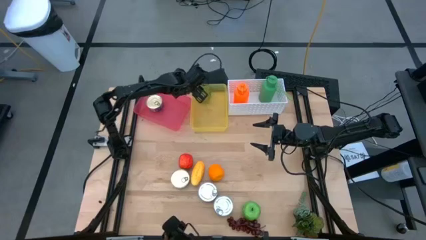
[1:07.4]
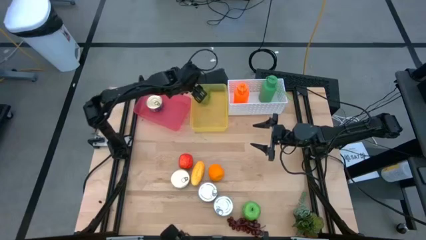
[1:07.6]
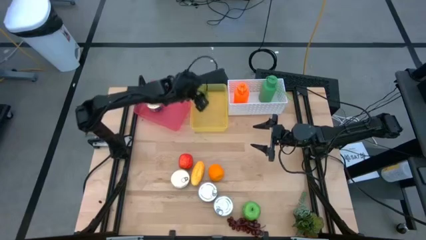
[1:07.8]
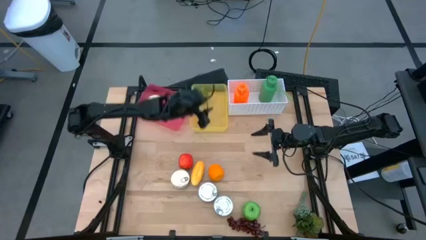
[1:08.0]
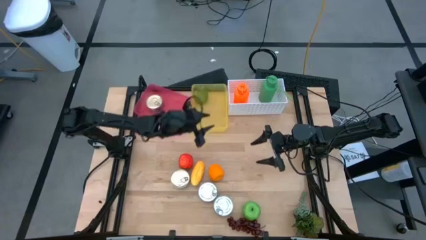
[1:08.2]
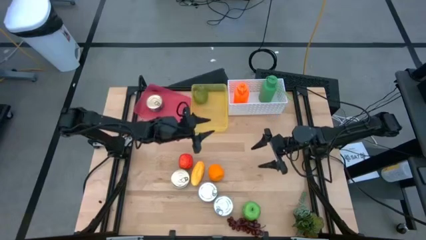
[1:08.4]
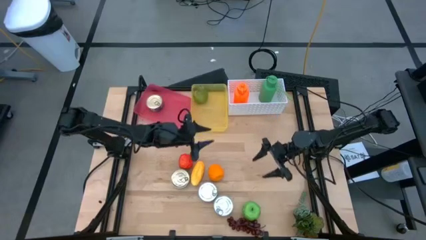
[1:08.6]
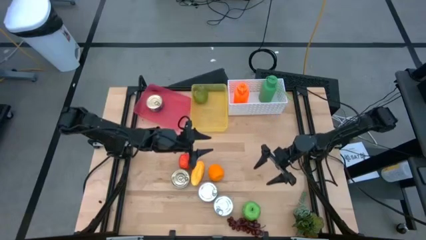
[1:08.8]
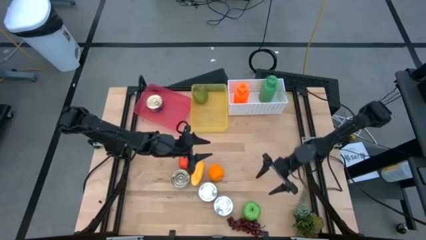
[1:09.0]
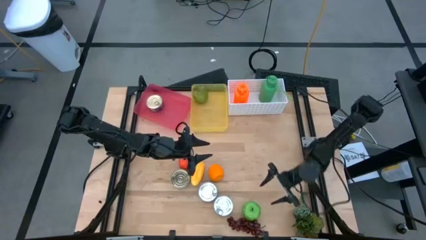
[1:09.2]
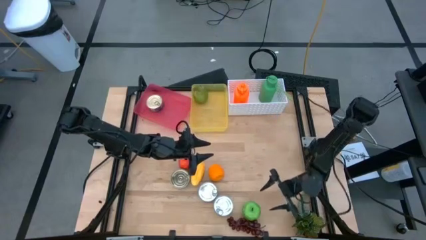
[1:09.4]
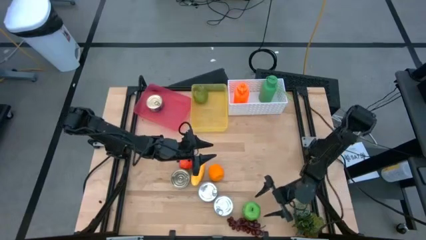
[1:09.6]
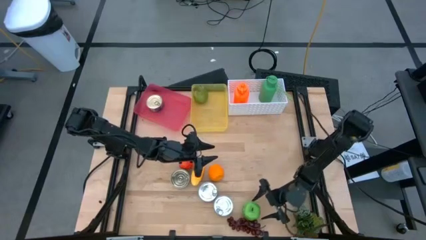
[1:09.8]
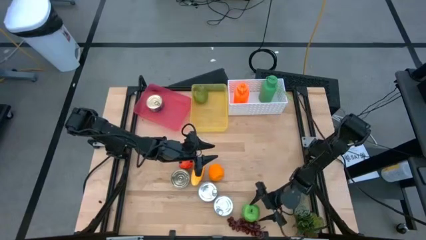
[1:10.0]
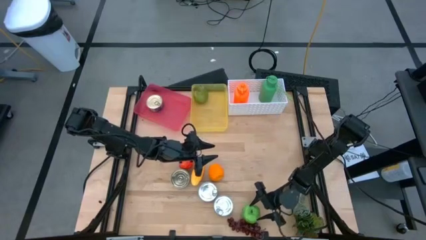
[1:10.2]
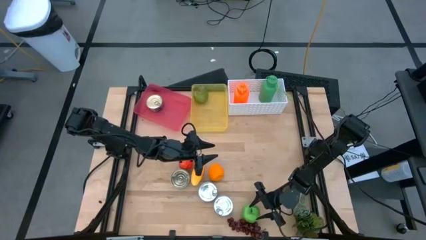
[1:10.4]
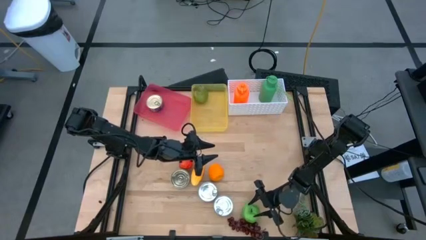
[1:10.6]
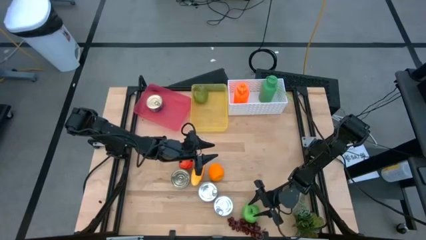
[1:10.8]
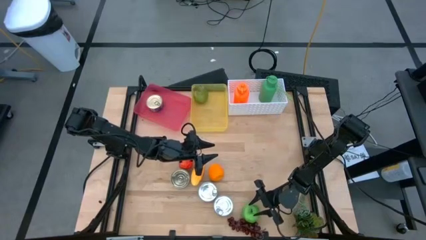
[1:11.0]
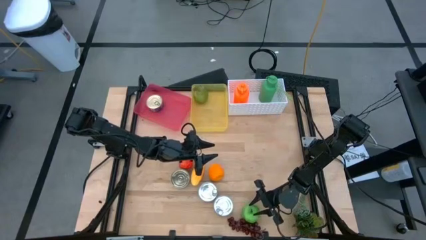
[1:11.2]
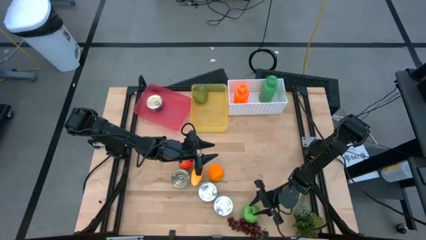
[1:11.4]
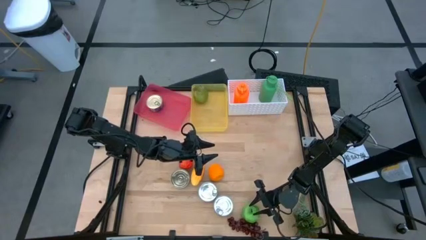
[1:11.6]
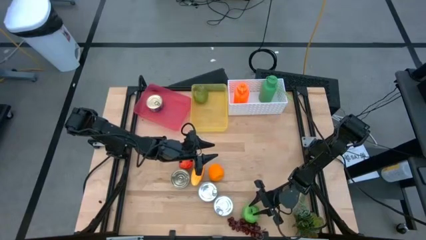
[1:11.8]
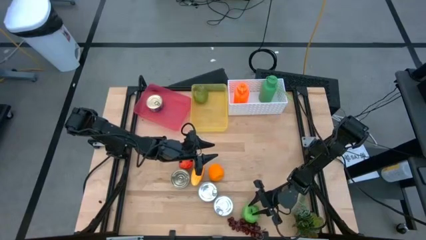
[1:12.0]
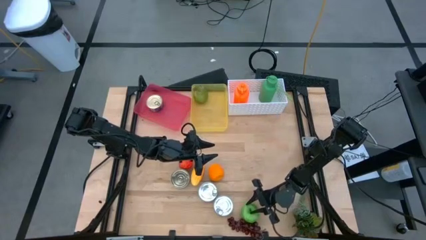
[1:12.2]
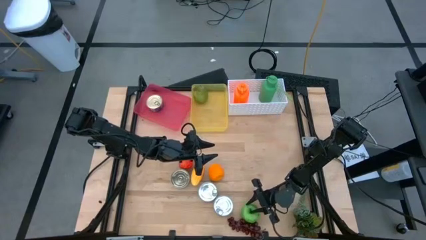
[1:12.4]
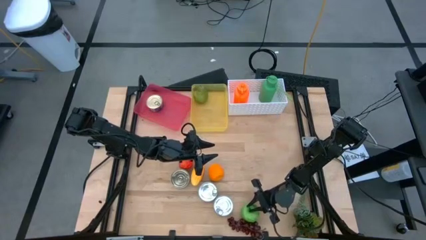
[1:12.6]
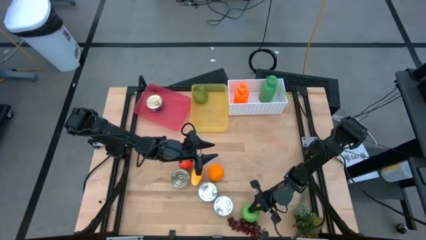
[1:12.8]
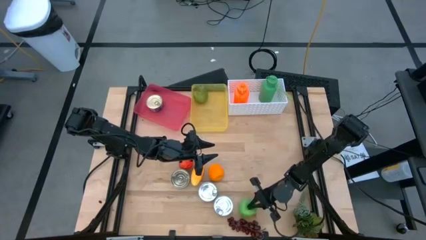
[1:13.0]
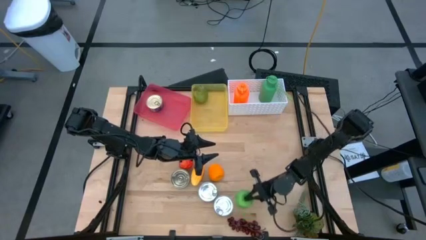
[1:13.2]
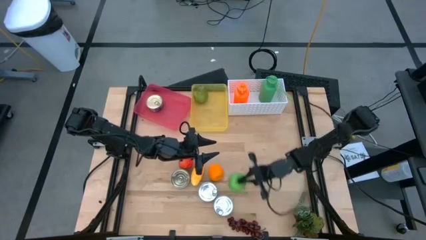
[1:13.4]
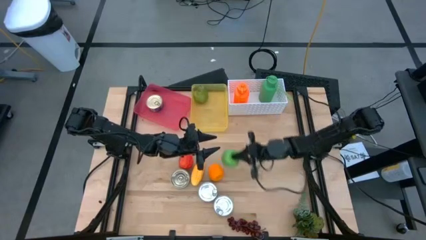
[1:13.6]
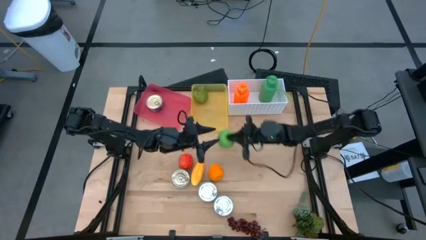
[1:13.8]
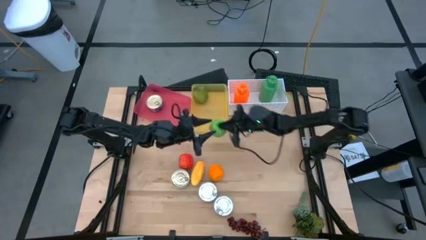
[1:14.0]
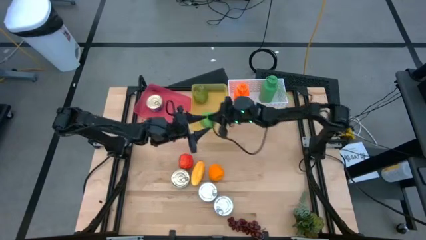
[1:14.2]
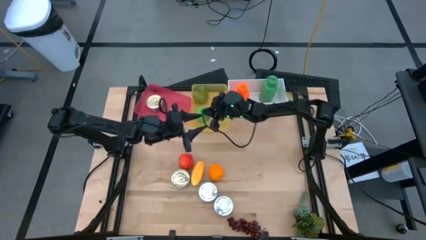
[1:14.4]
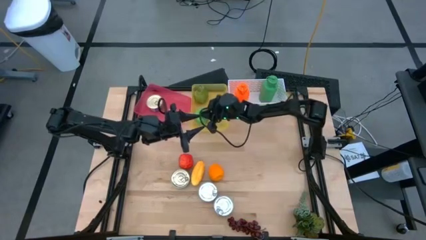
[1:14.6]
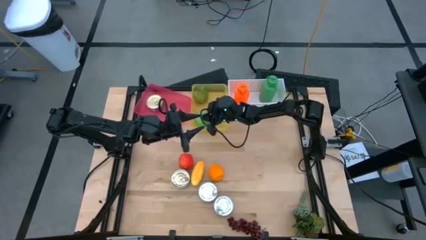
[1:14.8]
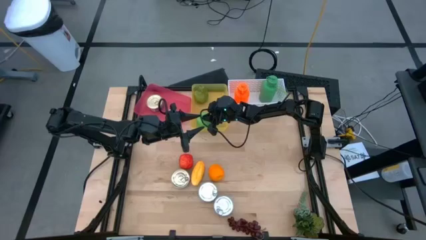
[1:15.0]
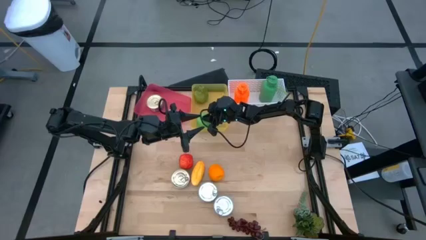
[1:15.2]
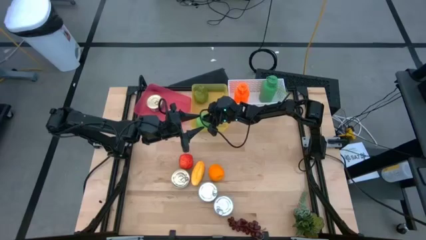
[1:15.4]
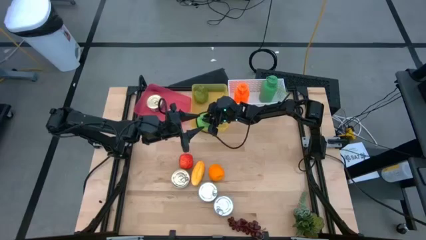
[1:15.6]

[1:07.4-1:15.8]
Task: Pick & Place Food Item
Put the green apple into the yellow bin

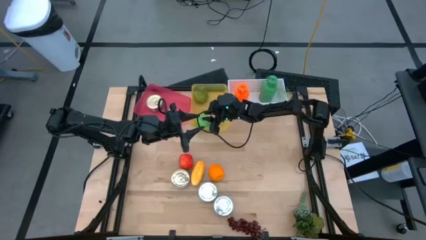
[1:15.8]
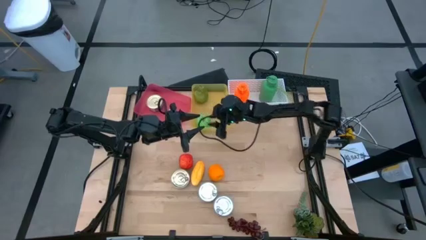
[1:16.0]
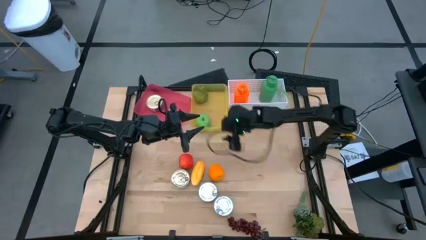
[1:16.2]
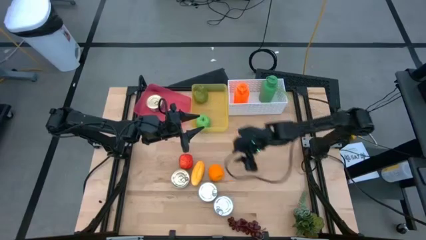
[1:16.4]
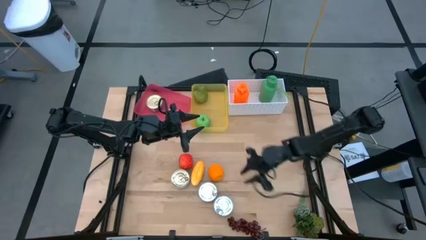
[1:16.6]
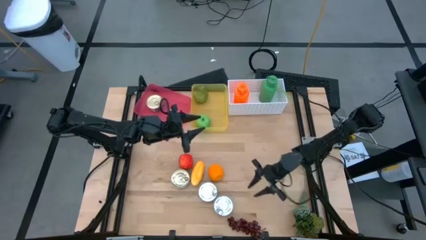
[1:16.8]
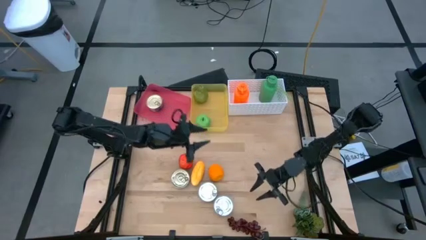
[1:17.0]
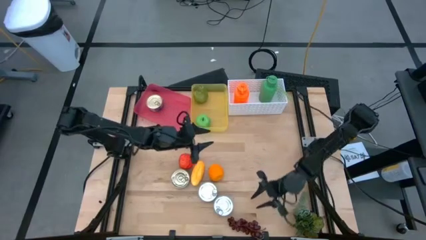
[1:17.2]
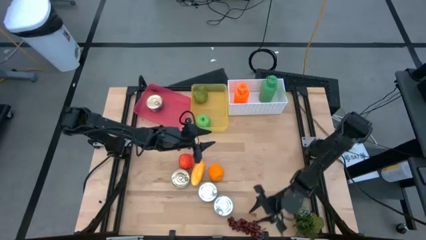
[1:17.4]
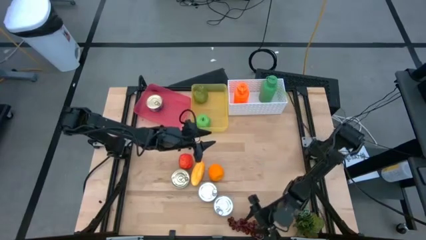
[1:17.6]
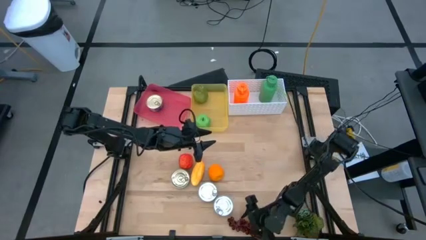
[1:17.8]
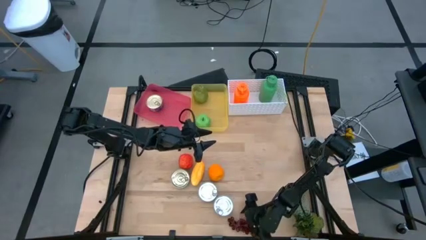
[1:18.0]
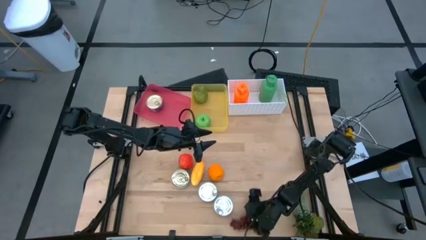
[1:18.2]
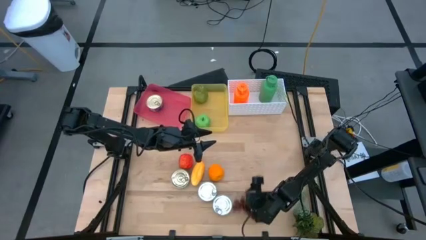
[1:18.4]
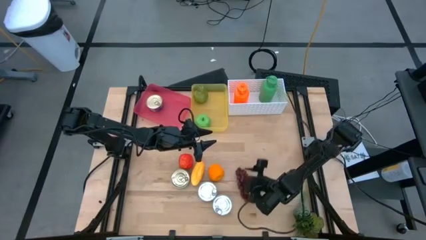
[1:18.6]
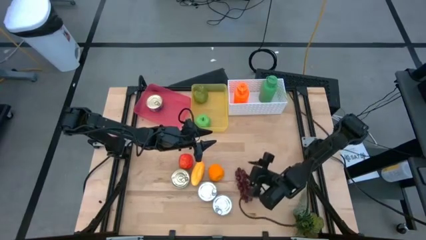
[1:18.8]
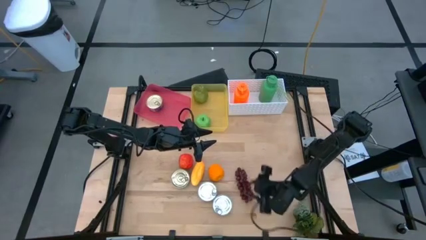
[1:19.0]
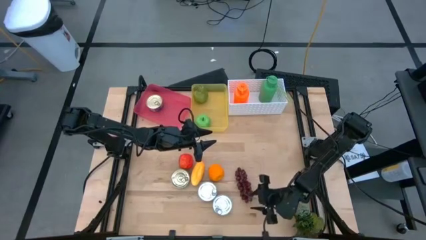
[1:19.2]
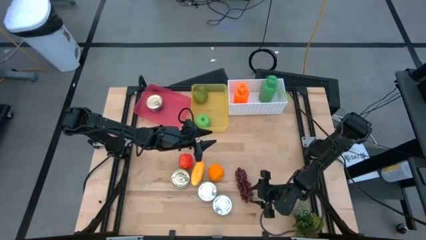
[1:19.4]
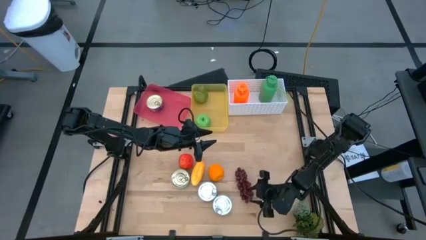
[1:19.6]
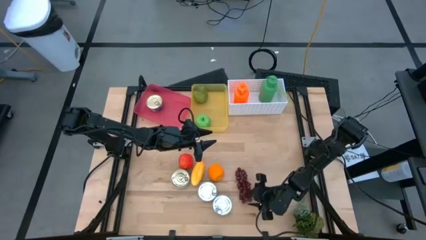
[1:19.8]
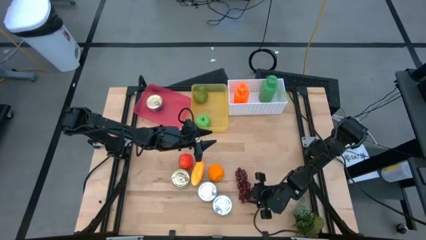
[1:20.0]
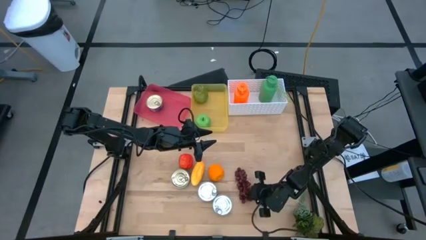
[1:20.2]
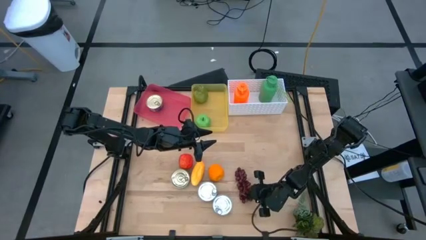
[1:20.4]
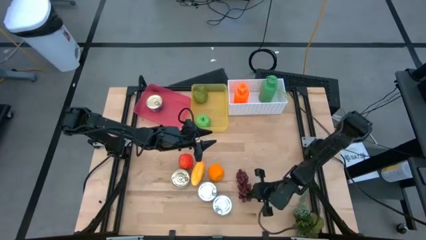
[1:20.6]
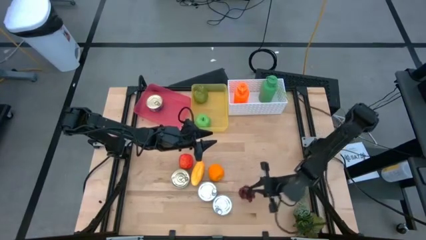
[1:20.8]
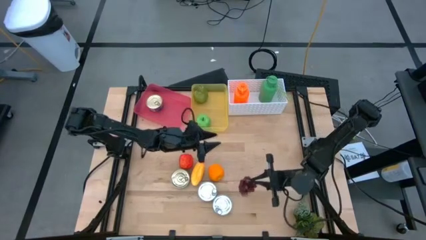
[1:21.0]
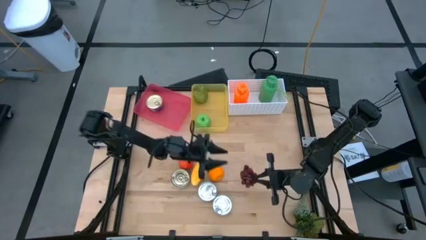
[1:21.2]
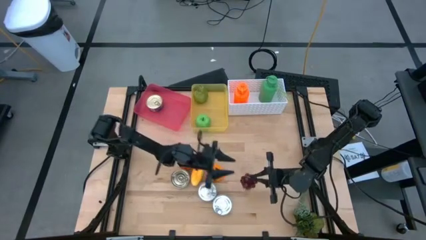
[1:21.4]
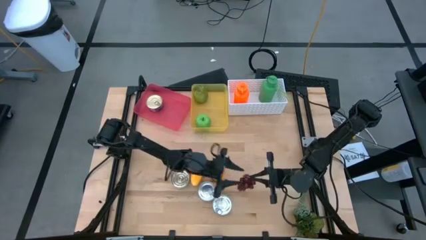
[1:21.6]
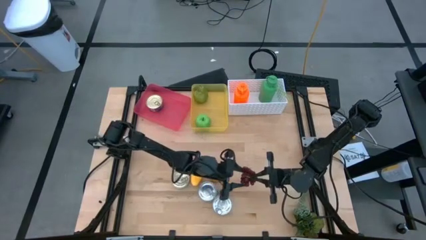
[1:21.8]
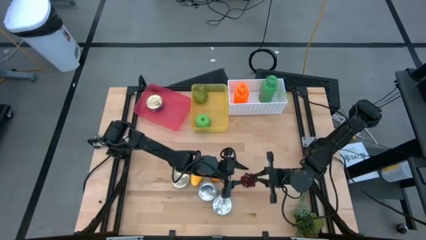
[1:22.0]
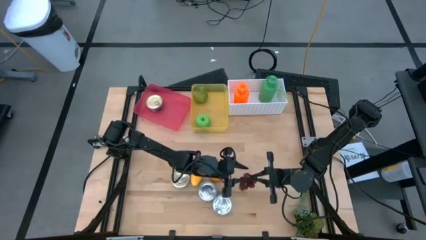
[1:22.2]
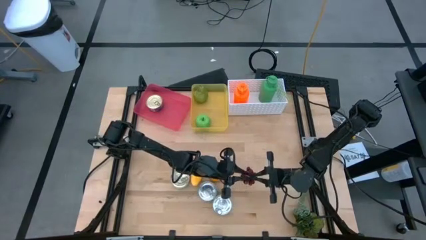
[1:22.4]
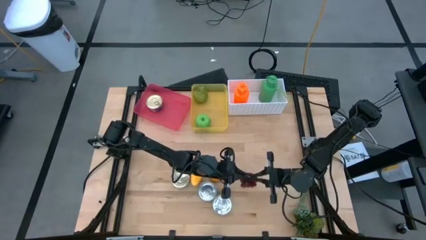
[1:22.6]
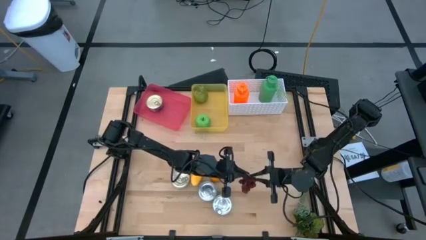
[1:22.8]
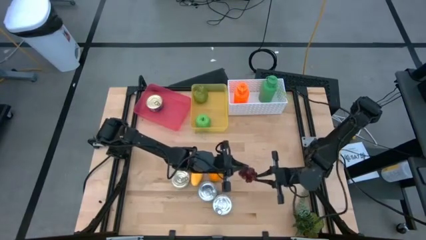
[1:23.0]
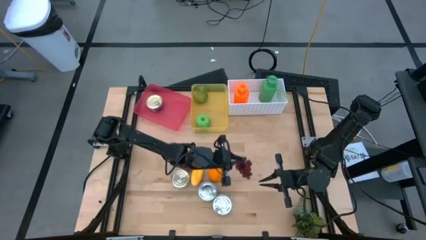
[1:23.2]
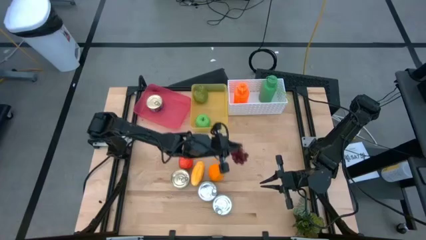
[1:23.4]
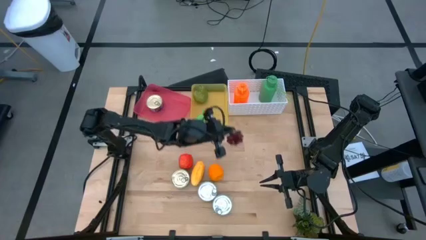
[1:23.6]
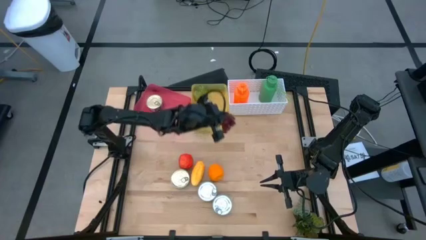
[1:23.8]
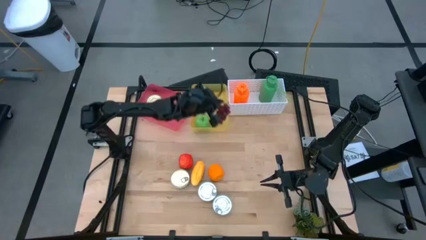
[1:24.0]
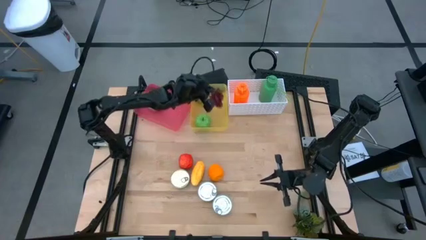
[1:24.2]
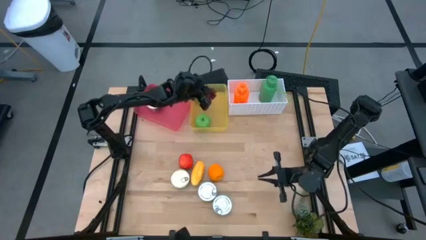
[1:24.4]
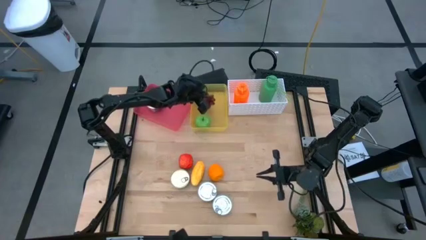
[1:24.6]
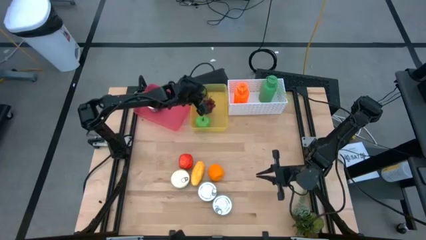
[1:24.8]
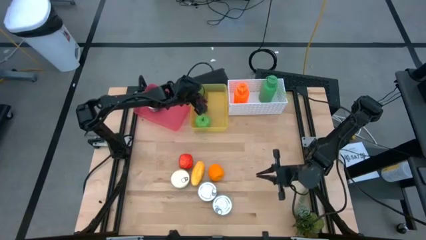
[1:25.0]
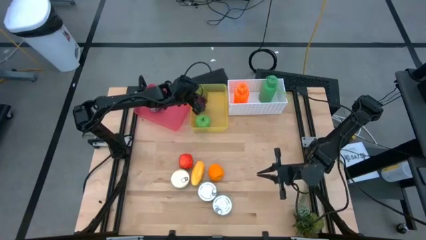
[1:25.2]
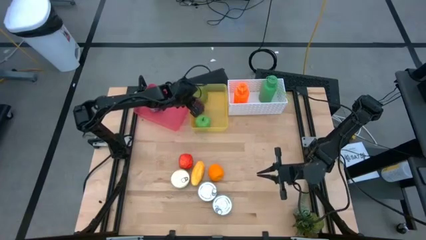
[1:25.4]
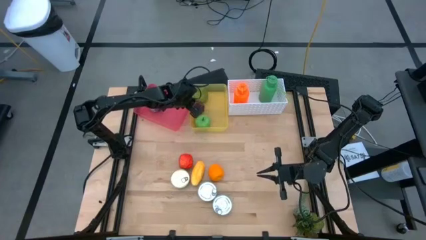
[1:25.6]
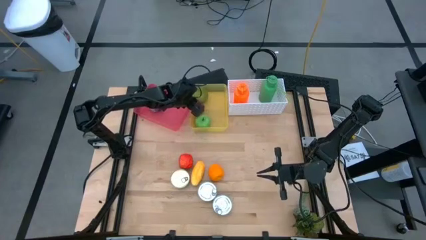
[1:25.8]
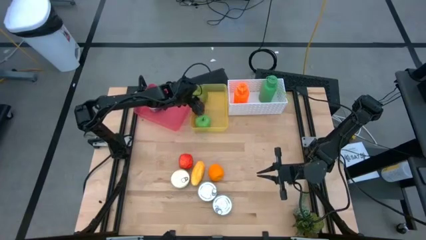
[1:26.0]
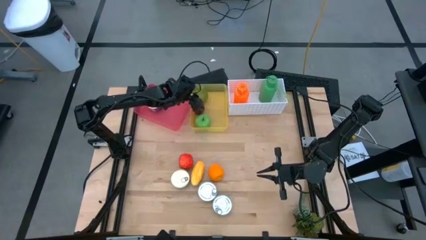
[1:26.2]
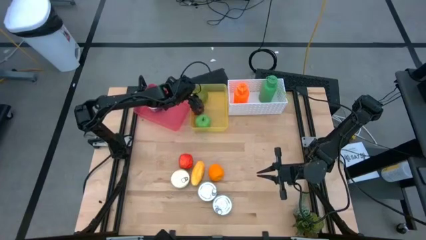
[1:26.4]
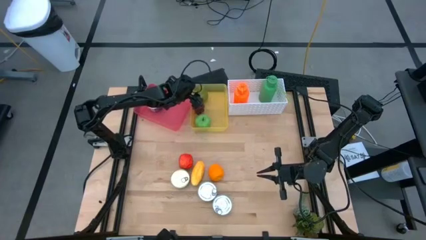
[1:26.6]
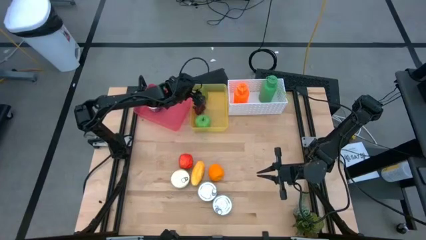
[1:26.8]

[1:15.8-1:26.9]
Put the violet grapes into the yellow bin
